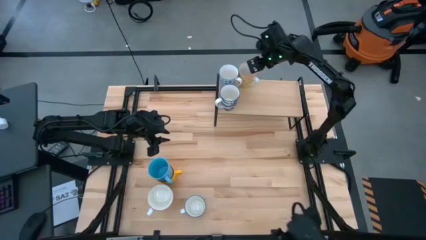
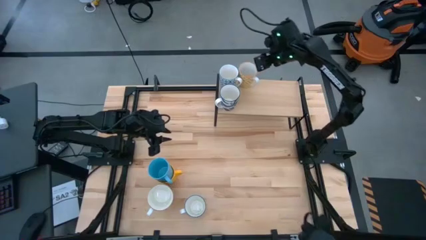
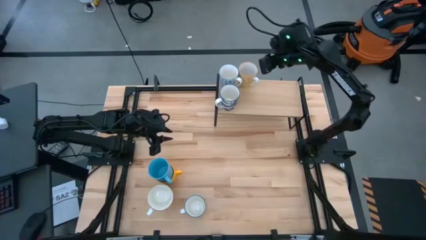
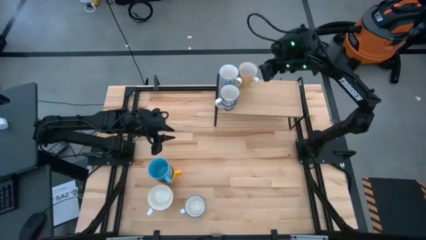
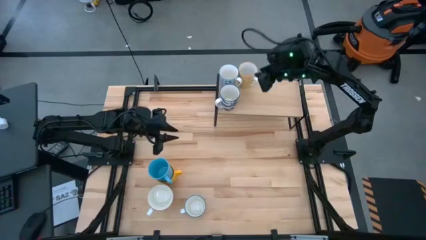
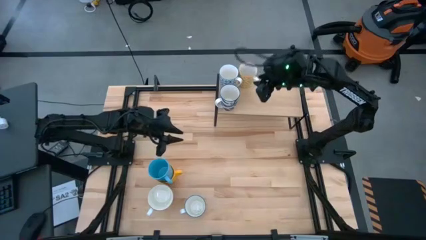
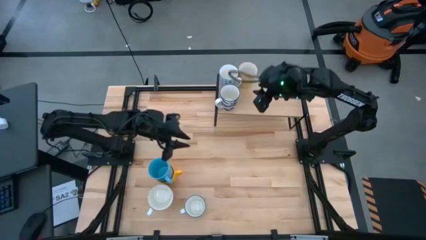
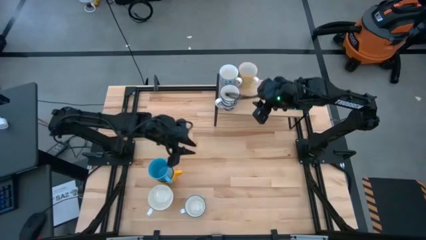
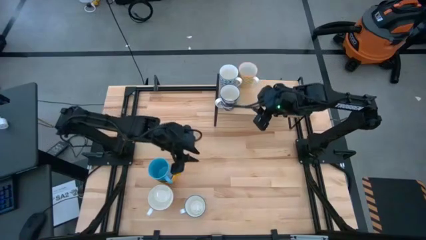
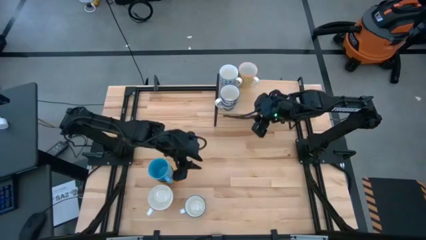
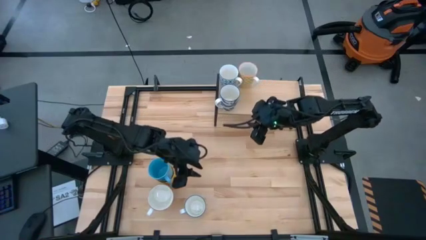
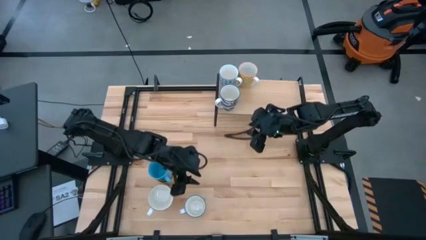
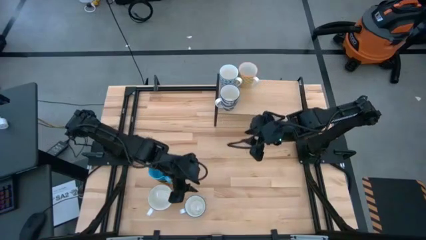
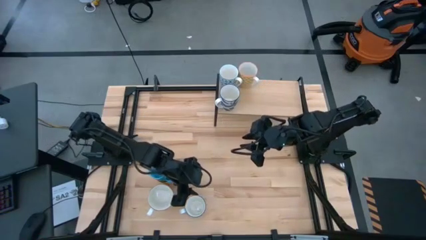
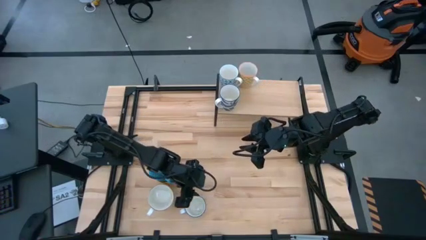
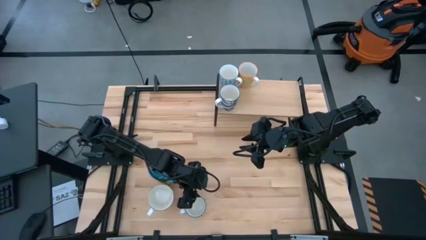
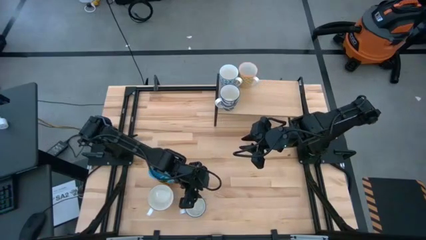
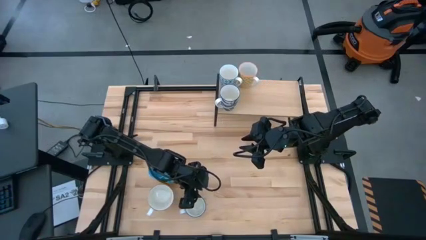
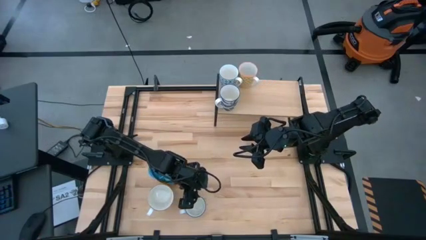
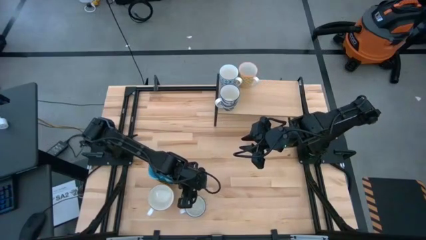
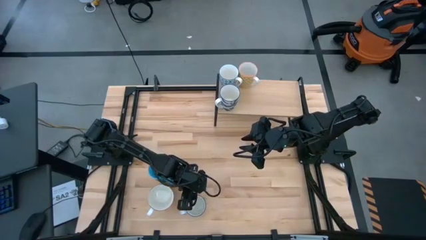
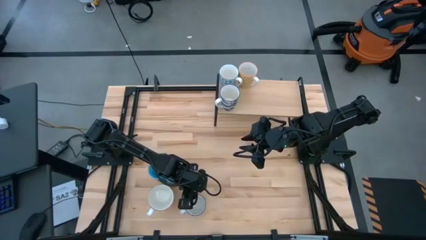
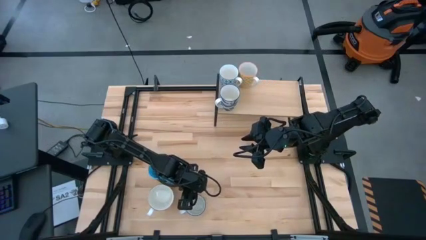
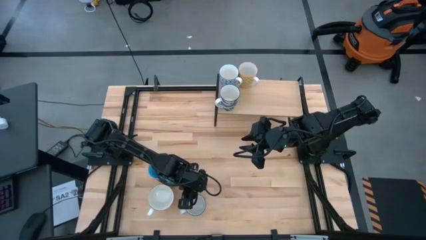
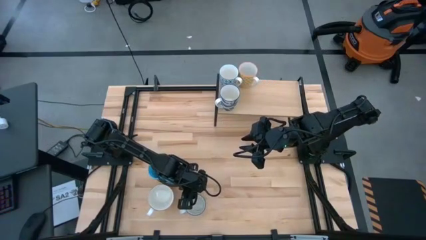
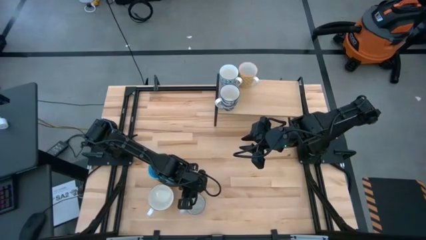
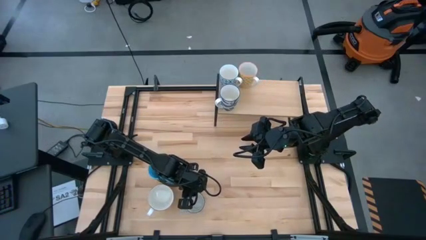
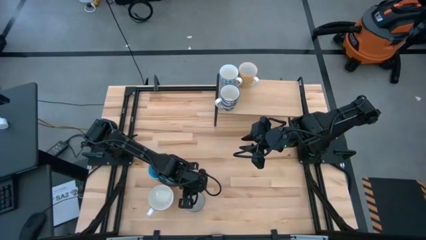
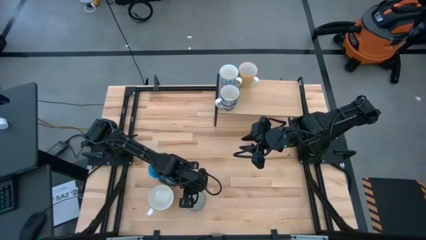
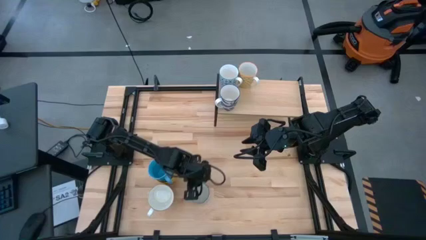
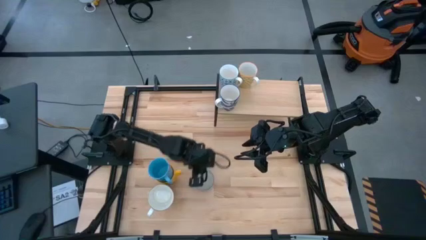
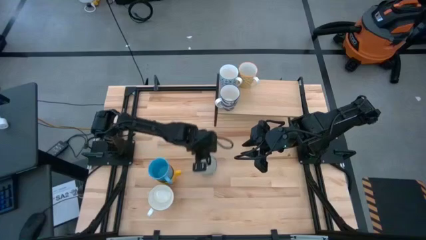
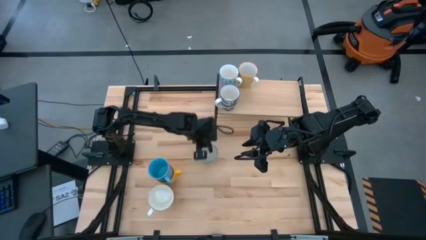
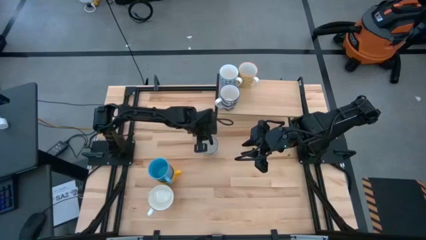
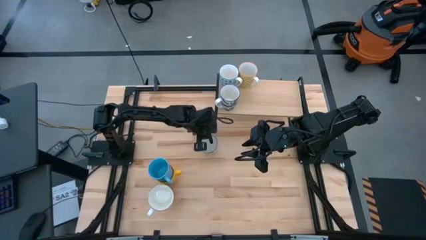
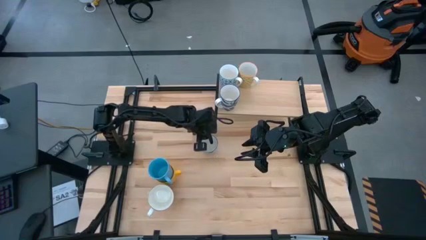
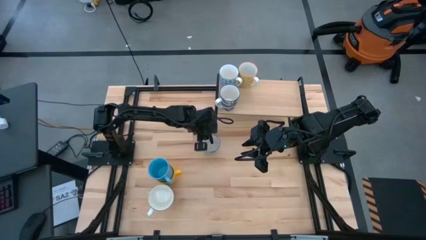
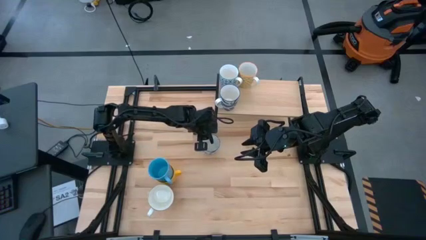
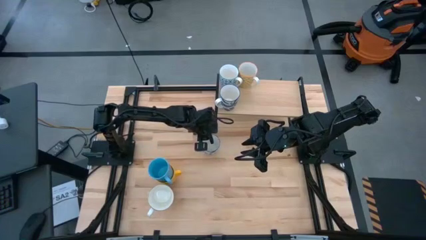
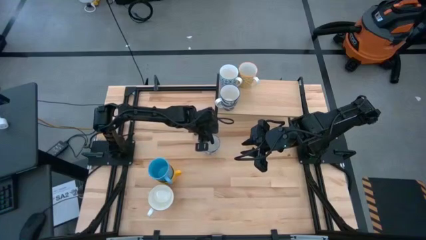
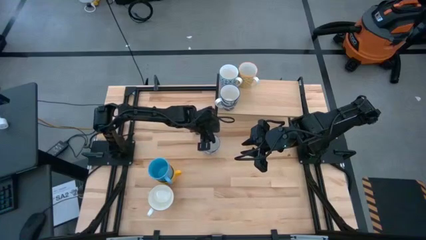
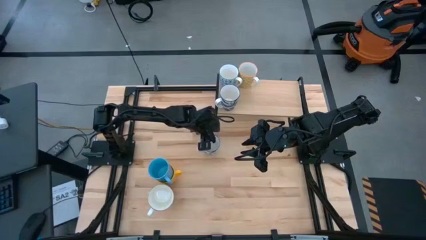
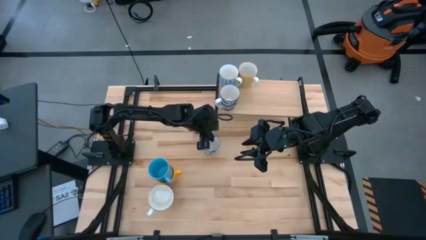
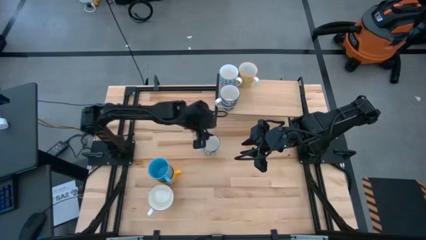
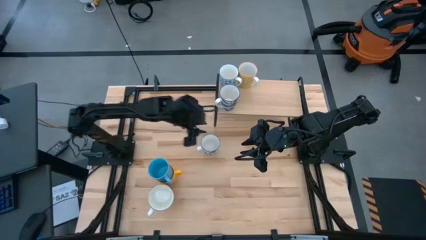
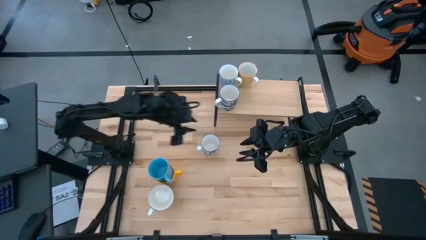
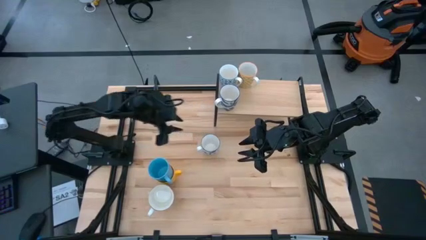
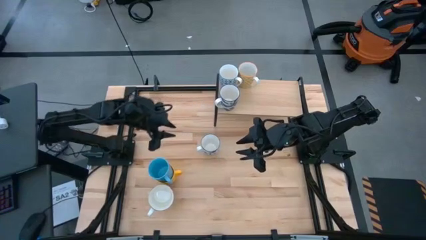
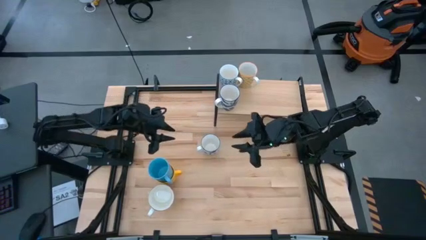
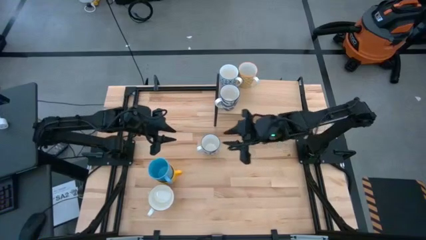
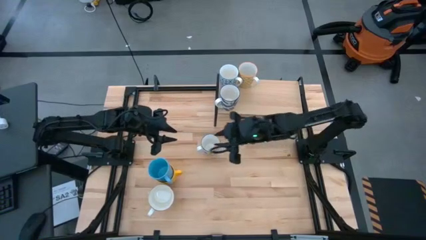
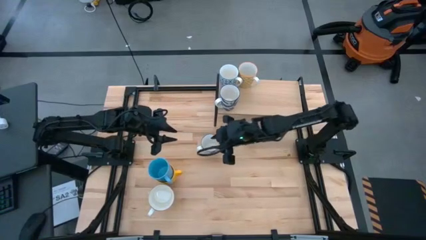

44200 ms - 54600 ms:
Task: Place coffee mugs
Put the blue pattern mug on the shelf

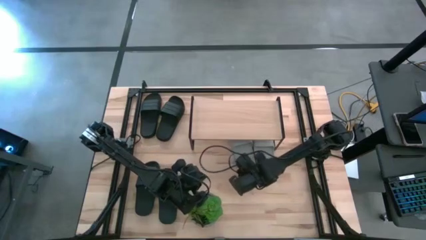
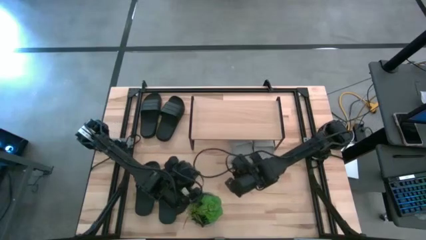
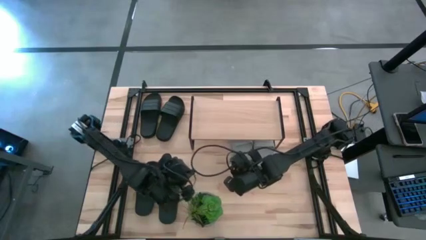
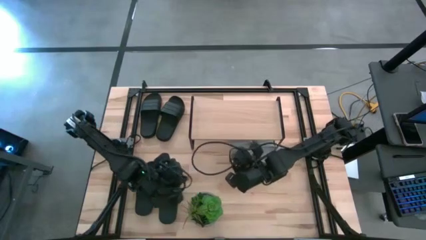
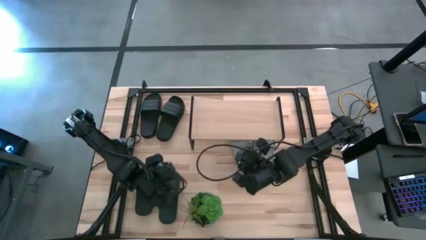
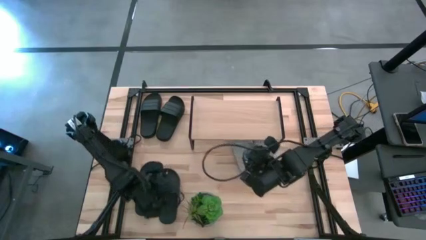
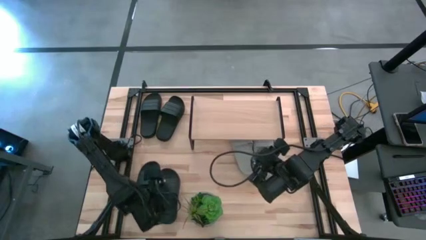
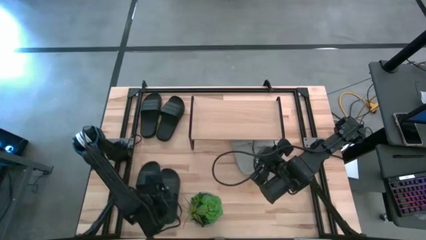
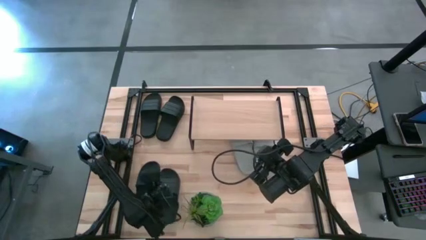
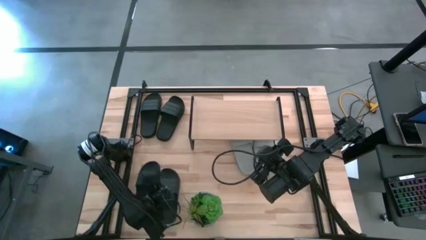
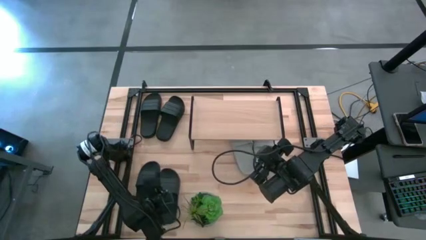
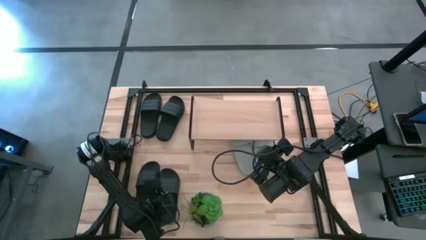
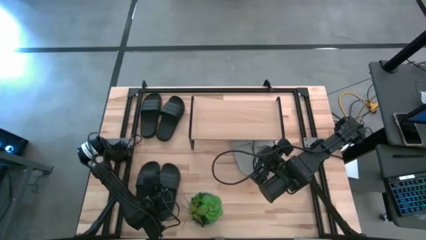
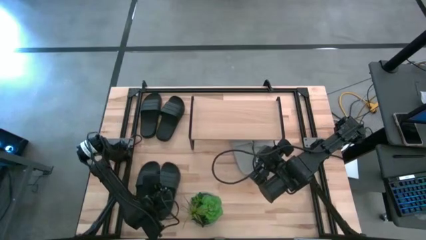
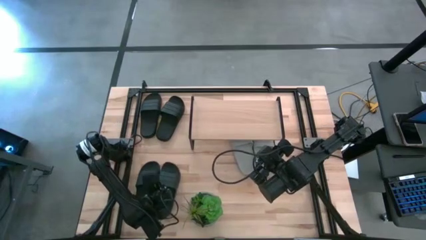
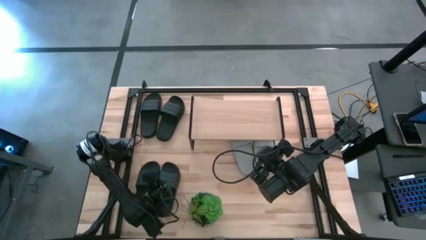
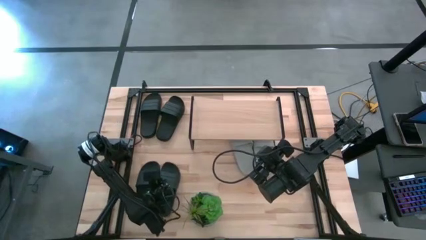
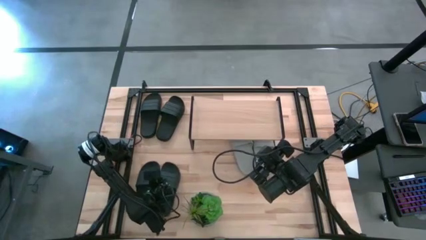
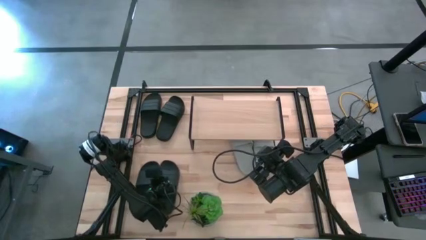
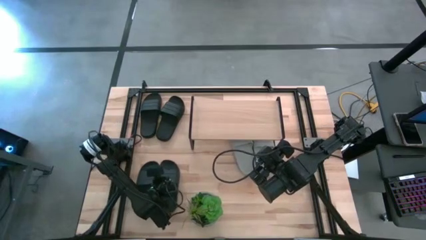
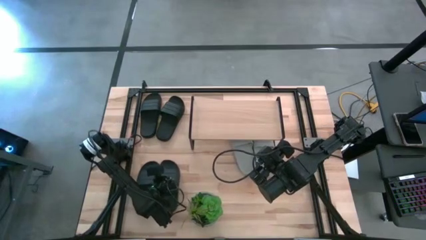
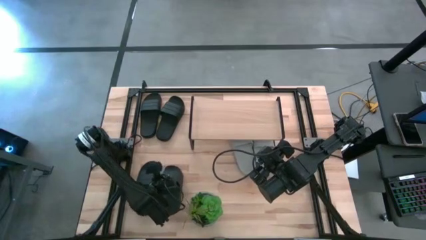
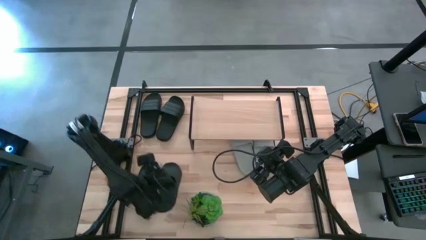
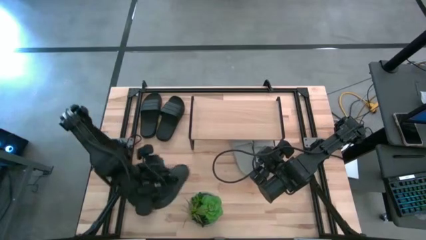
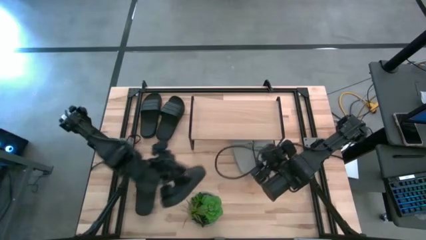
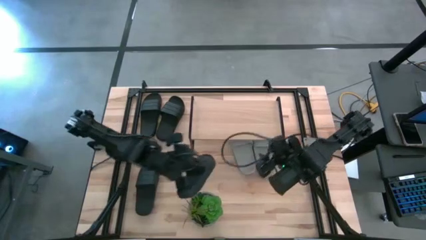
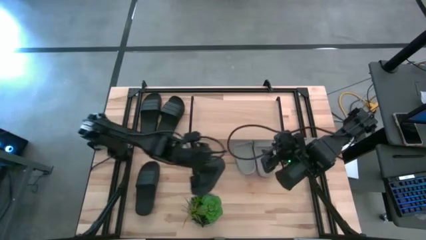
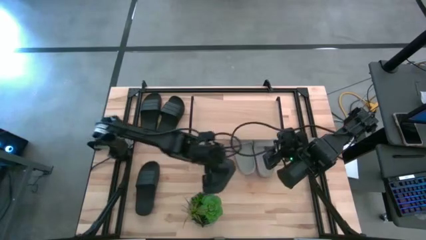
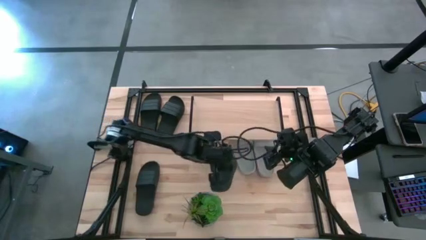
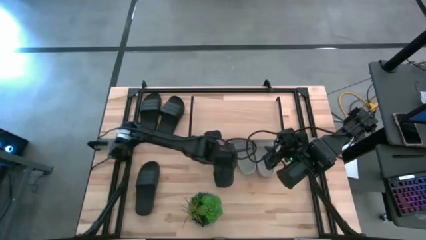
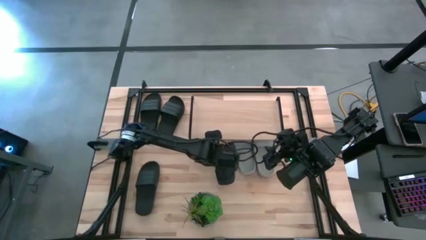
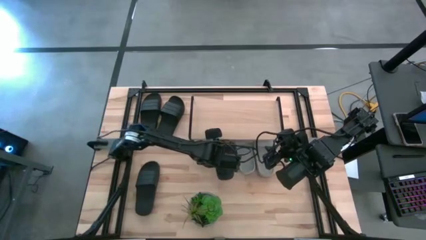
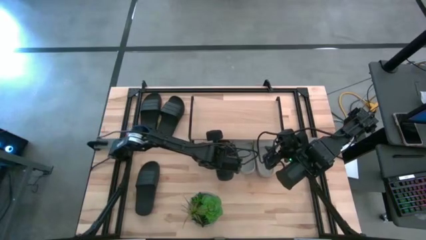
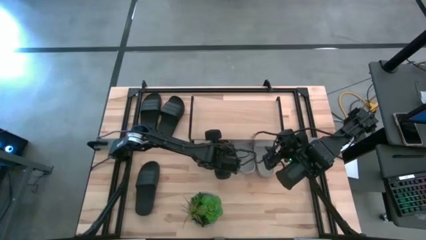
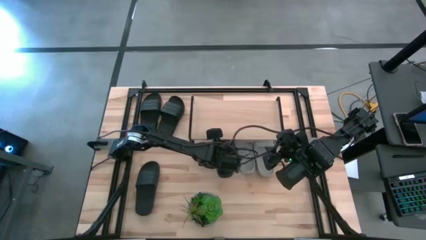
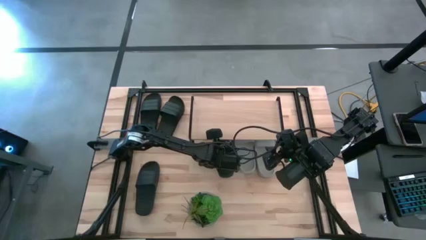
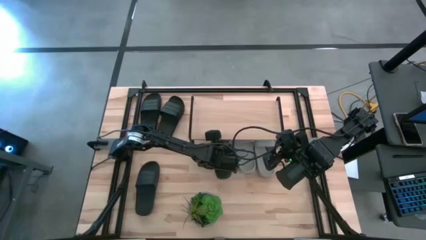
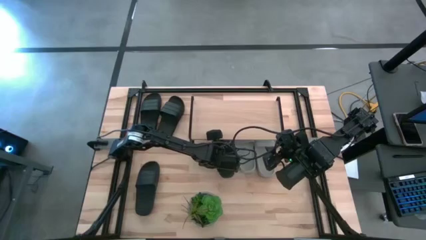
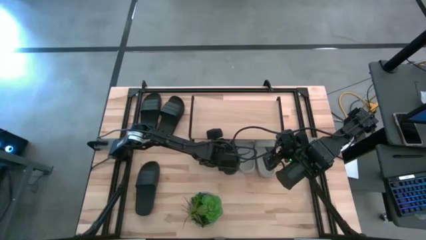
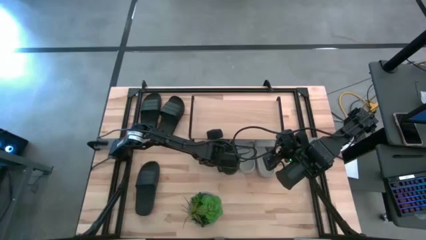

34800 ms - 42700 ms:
Task: Pick and place slides into the shelf
Put the black slide under the shelf
